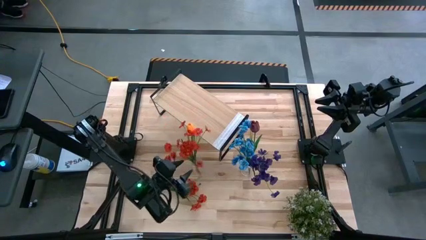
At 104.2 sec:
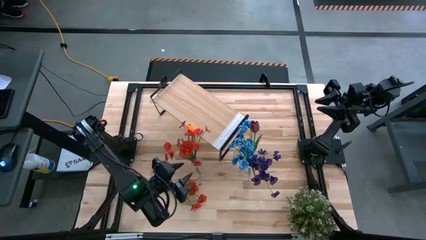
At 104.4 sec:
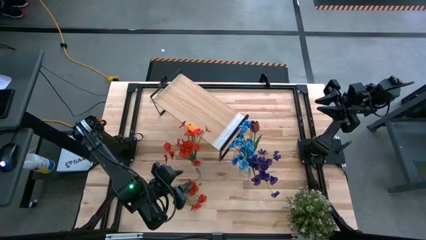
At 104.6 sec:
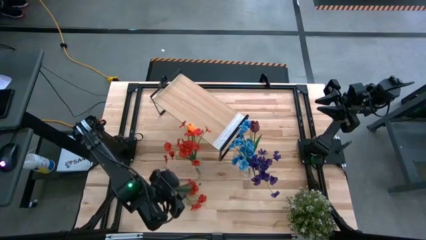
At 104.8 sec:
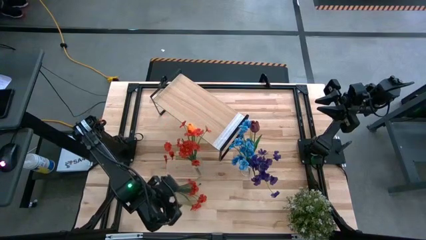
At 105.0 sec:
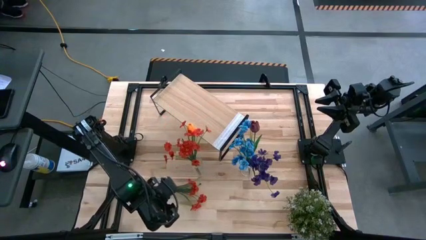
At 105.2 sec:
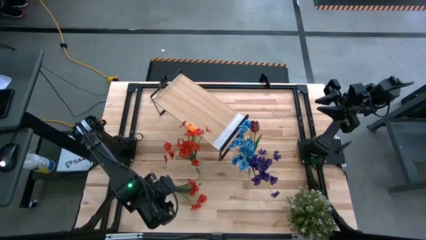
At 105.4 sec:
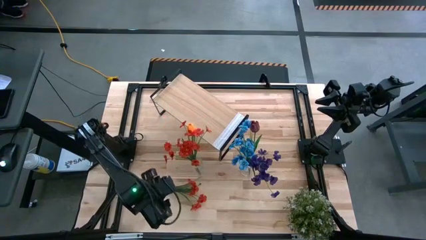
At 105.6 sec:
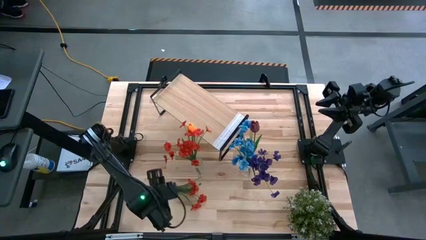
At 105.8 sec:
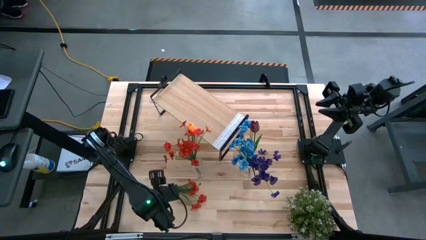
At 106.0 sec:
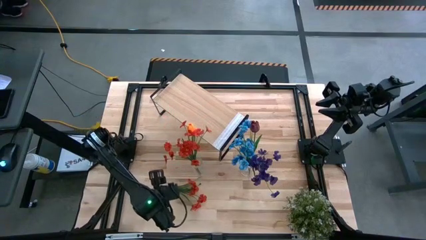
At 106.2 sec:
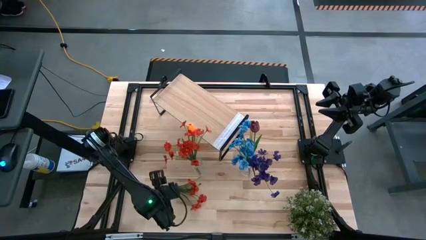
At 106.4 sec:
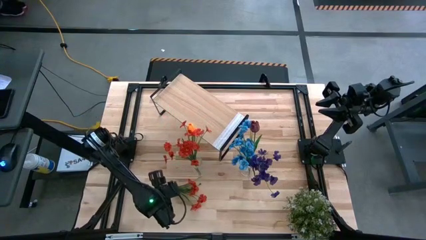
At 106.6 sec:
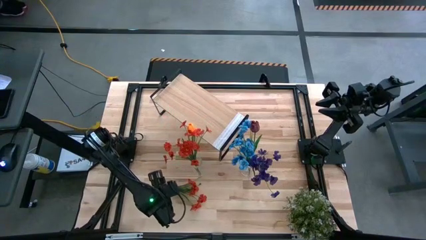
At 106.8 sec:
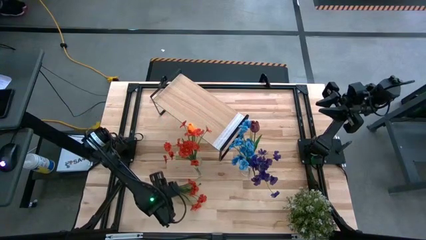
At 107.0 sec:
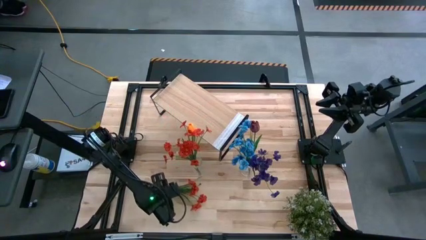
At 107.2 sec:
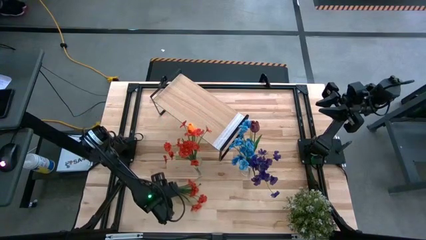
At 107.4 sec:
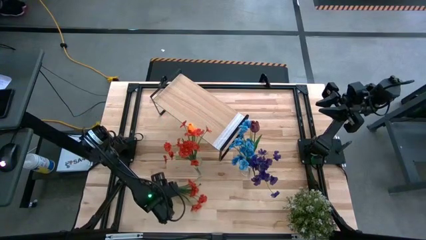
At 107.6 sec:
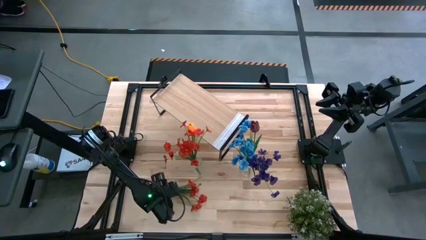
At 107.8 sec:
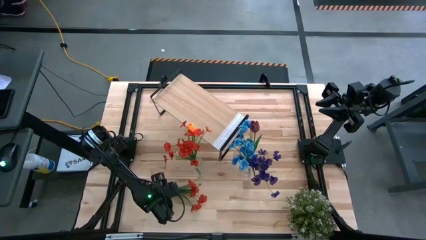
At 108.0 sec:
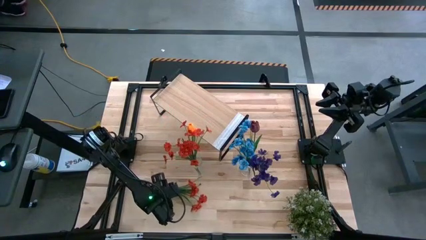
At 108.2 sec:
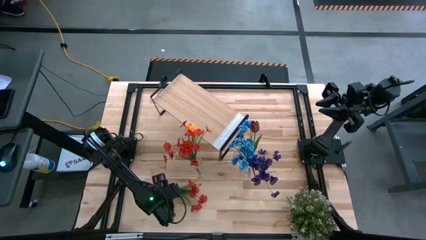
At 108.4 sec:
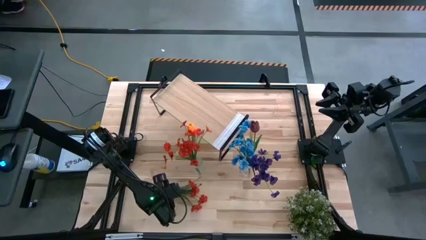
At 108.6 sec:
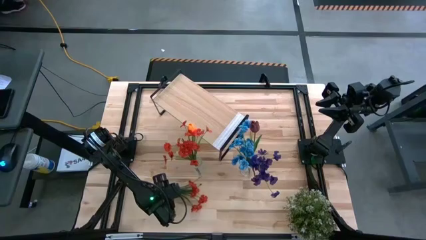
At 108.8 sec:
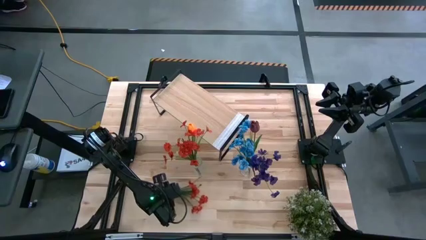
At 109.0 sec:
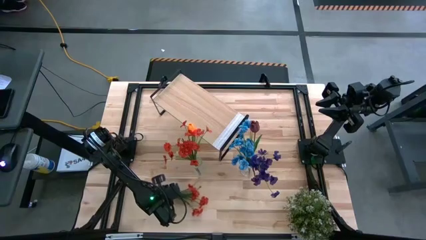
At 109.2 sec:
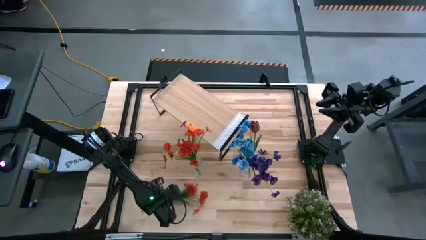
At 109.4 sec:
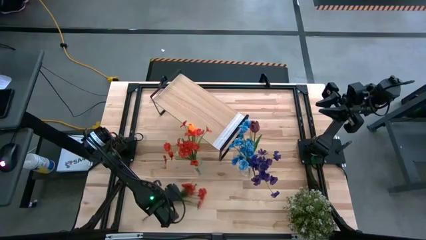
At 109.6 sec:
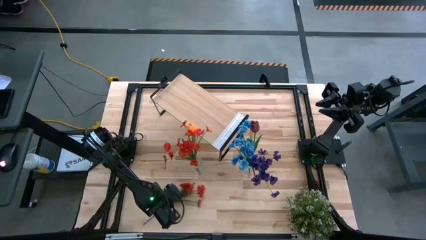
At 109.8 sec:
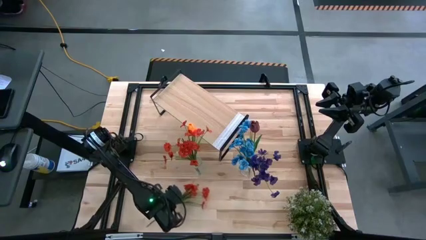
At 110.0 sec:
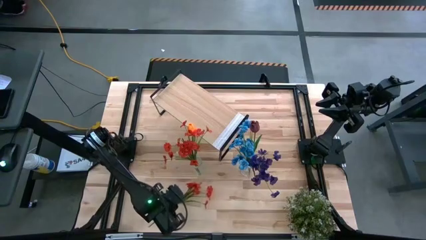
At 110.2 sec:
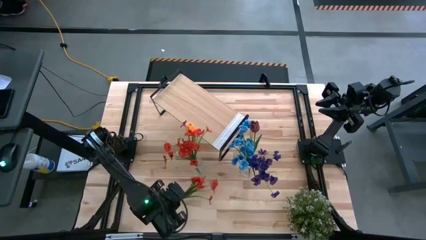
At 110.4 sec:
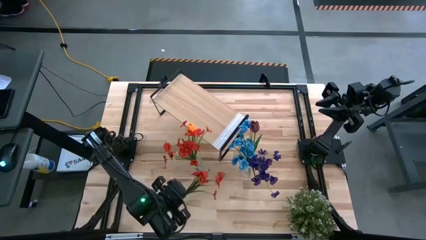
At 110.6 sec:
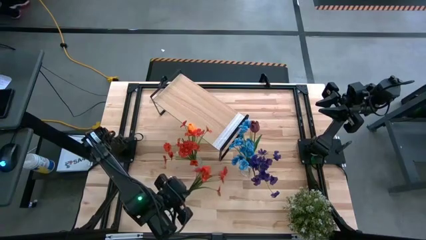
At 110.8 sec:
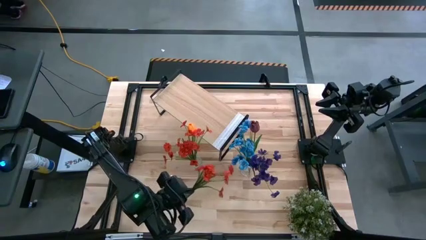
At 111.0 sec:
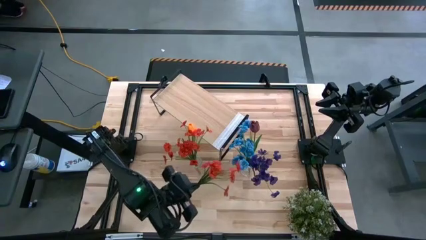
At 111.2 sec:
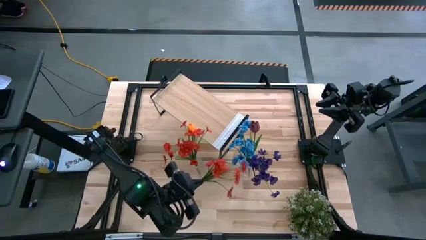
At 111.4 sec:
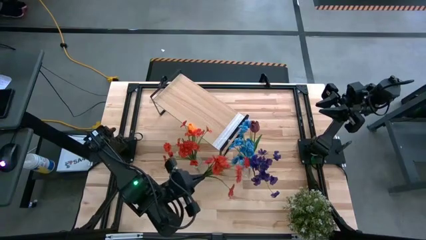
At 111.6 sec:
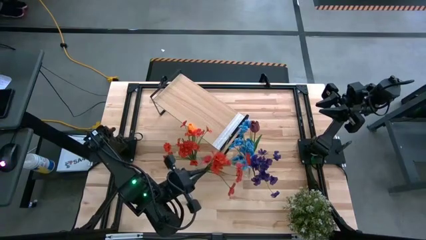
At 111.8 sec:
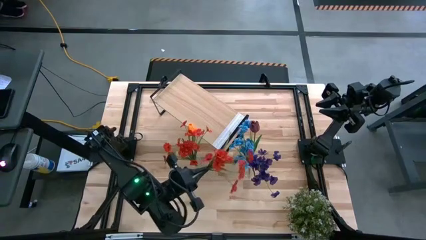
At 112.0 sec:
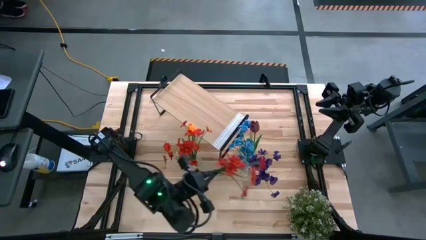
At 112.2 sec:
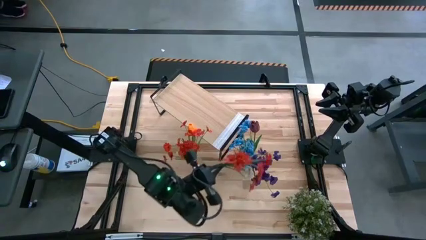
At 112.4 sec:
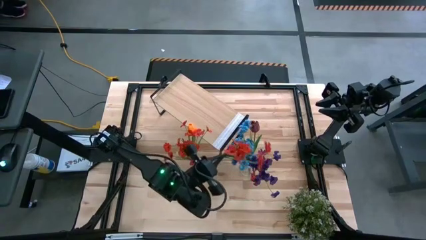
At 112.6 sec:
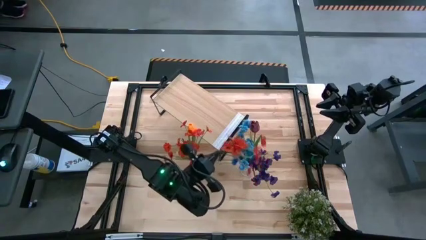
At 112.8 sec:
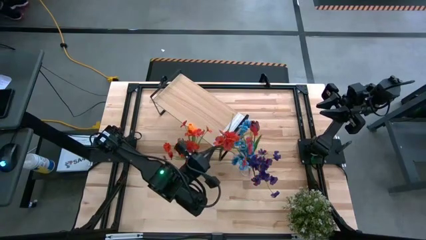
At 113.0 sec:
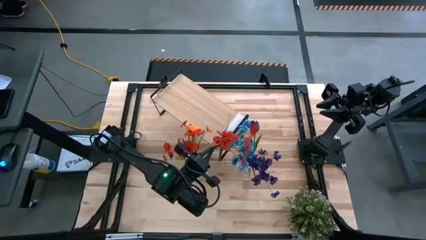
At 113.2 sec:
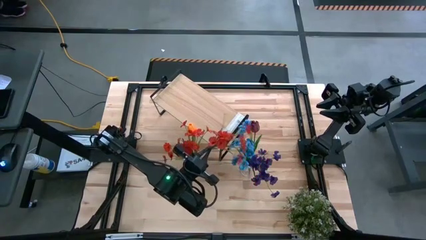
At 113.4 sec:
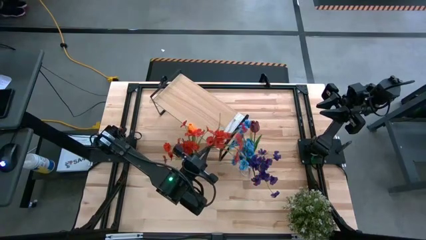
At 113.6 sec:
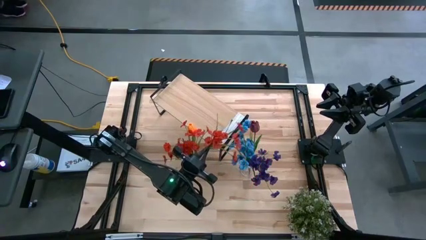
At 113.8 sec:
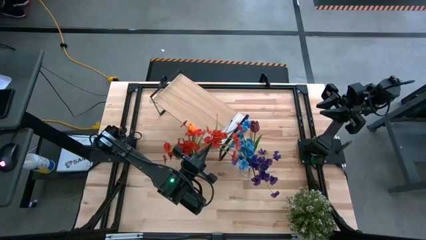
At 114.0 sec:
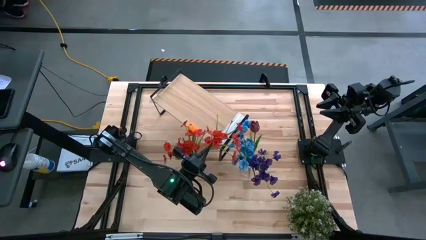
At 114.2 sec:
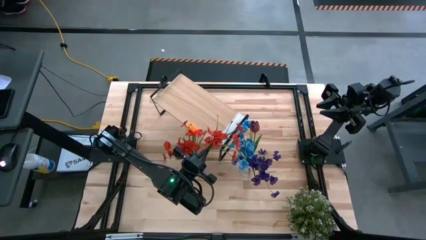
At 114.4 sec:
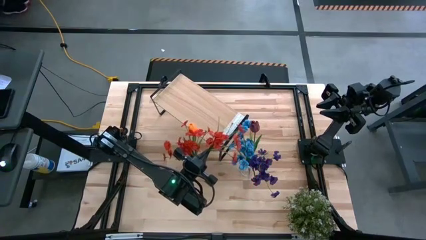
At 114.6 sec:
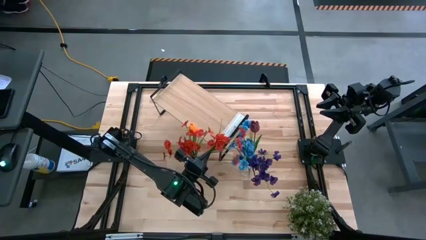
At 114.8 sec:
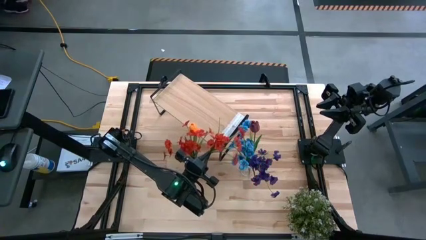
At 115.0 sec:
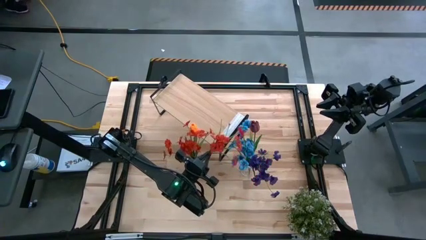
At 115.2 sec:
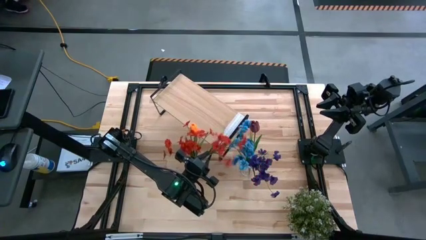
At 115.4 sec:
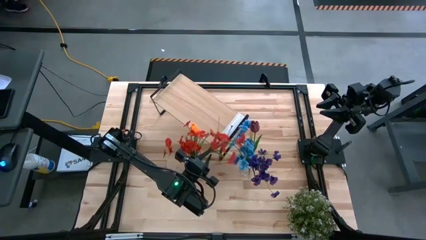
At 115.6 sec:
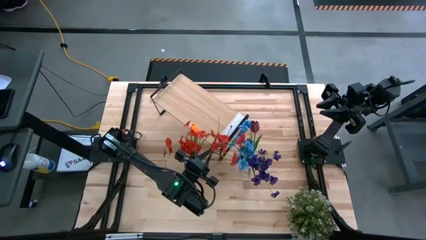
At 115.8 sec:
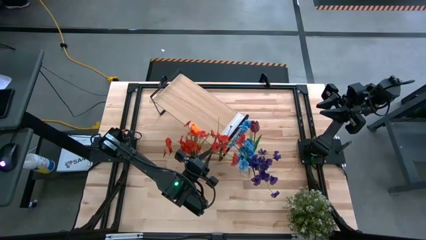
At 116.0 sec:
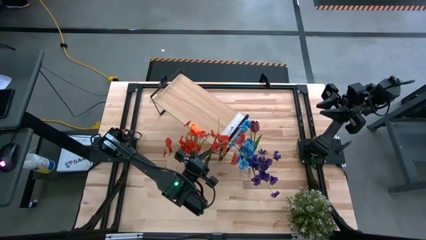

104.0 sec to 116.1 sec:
Task: Pick and place flowers into a vace then onto a shelf
Put the red flowers into the left transparent vase

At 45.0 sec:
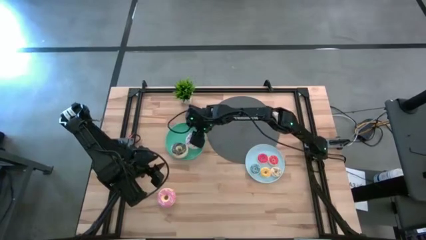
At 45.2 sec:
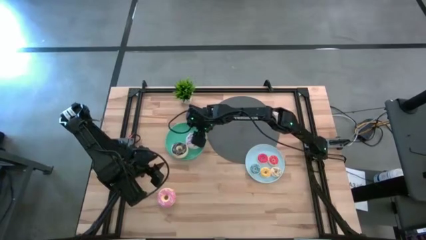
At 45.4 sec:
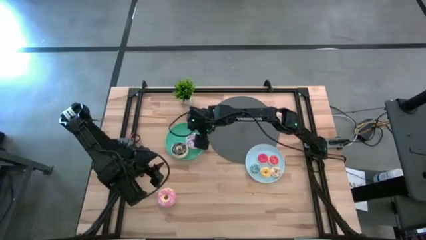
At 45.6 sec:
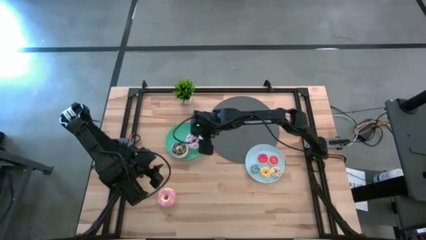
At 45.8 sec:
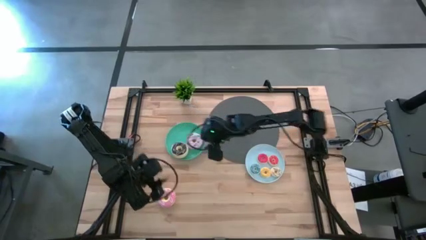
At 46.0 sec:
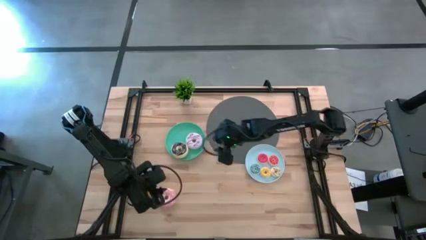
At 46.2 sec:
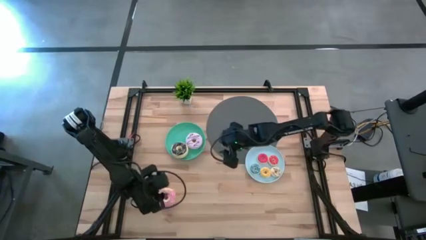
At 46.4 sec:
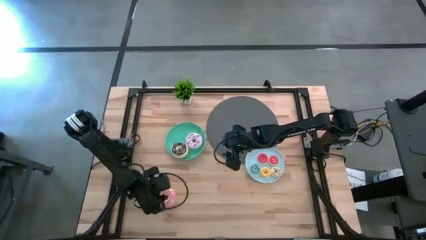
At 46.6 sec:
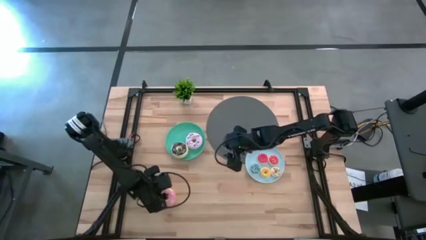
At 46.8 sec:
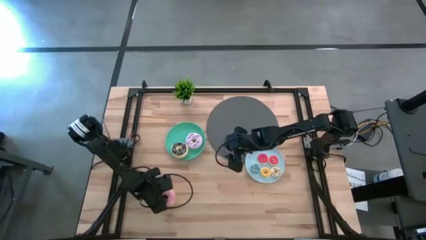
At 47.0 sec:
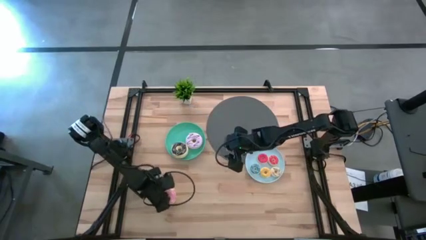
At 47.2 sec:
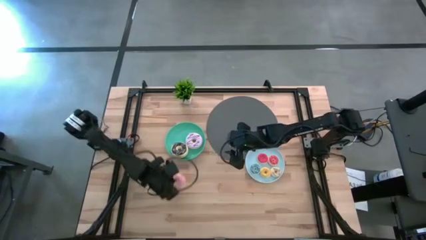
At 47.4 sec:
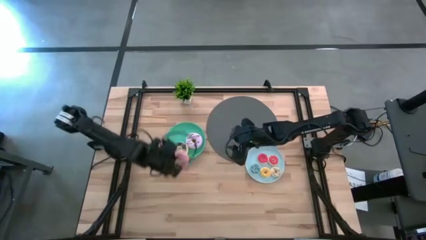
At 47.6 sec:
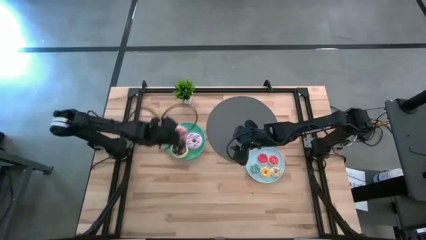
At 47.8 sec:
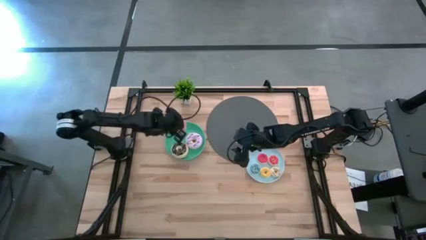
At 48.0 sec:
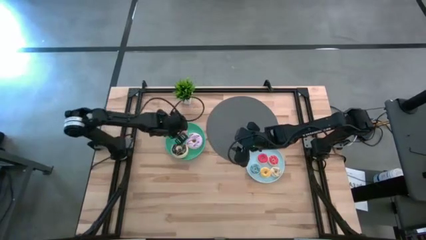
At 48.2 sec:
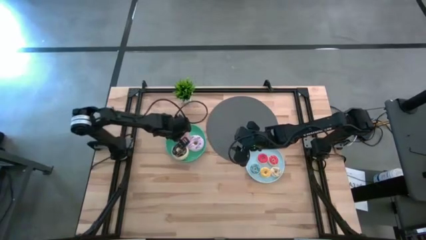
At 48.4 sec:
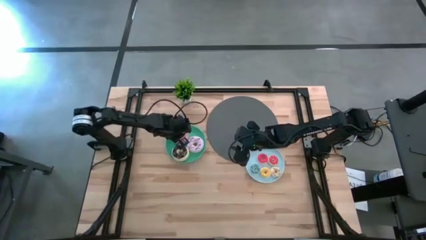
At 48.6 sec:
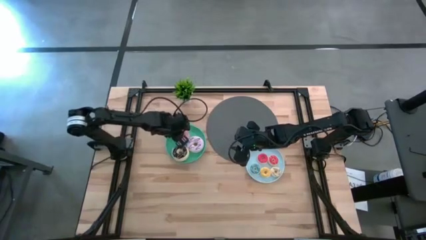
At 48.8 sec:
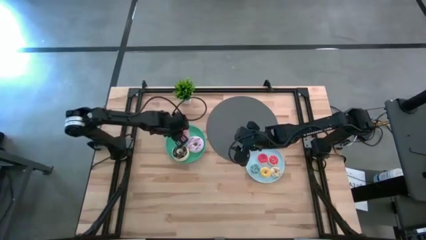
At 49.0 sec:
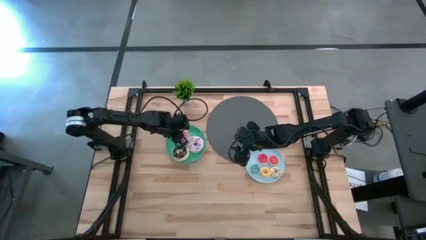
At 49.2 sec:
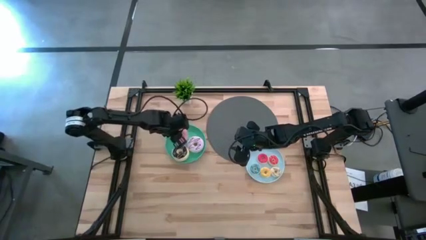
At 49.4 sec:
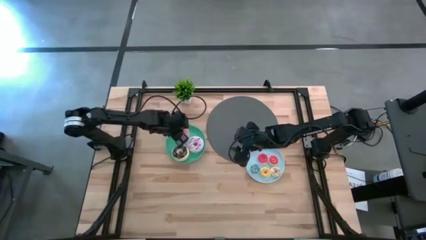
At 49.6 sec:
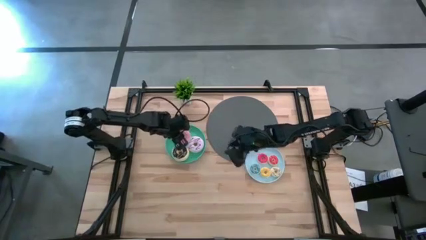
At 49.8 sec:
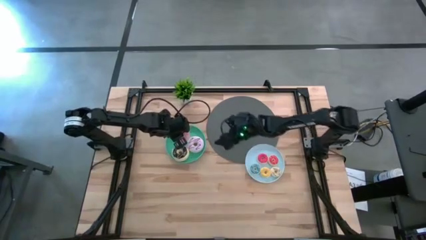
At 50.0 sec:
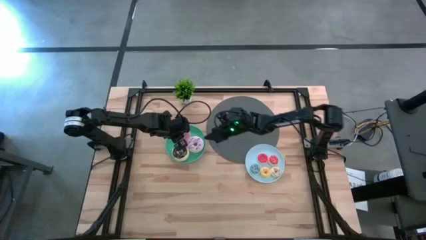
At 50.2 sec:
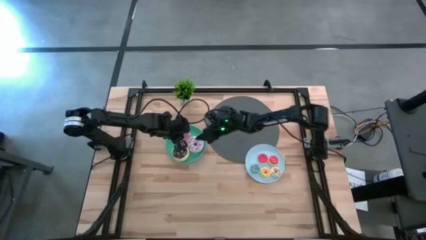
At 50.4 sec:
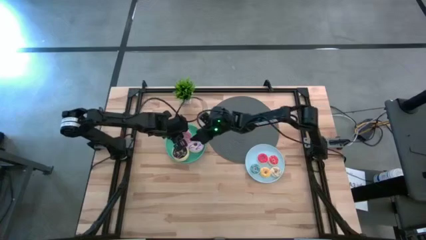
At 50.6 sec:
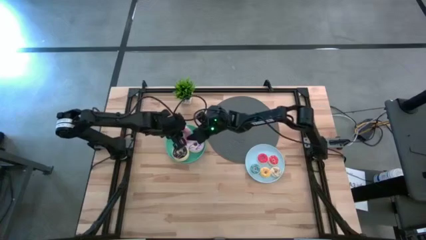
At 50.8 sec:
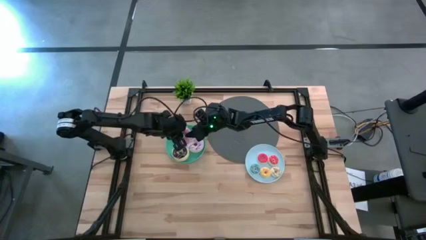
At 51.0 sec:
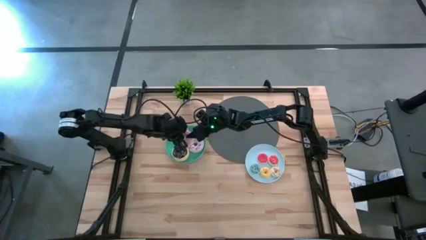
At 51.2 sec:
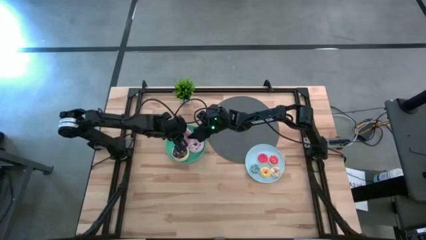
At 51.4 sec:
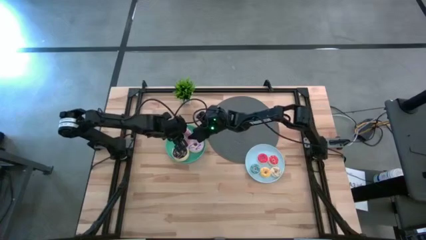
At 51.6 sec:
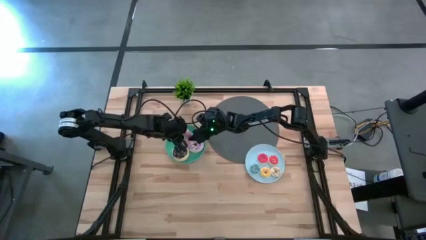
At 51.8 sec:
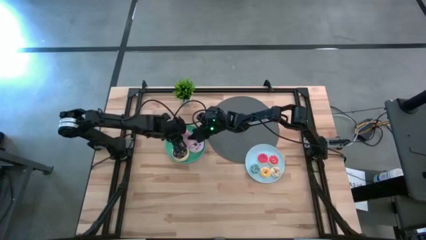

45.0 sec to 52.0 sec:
Task: Pick & Place donuts
Put the big pink donut on the blue plate
